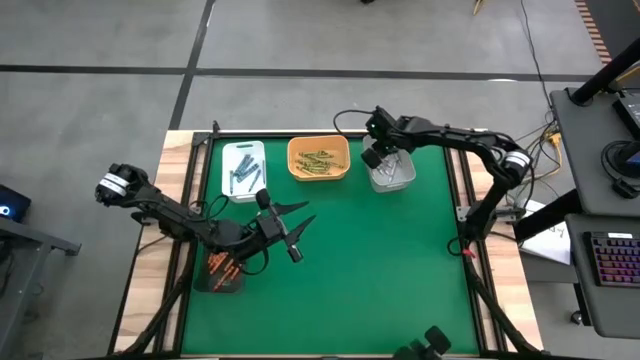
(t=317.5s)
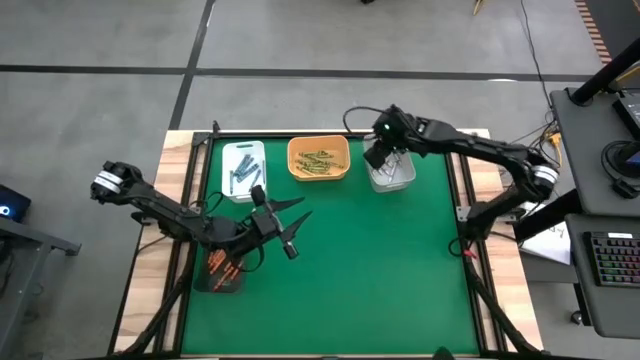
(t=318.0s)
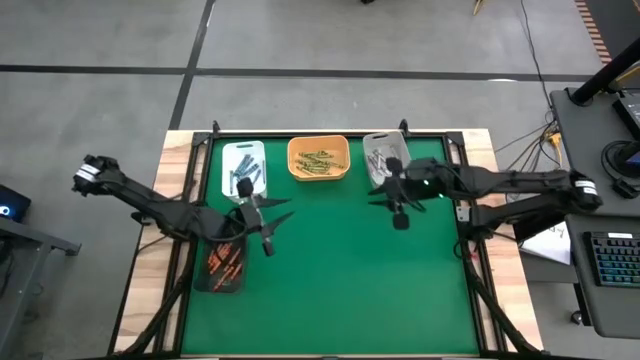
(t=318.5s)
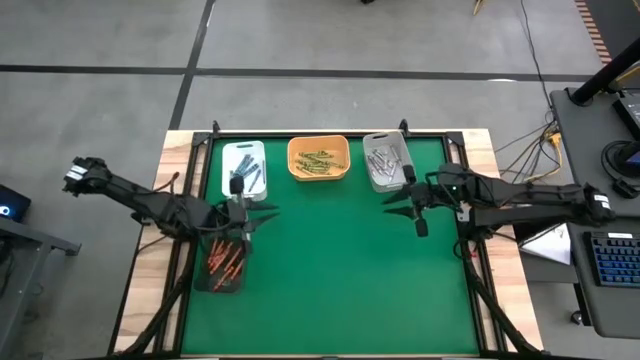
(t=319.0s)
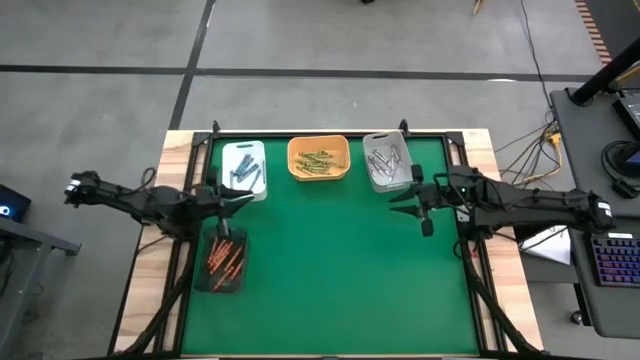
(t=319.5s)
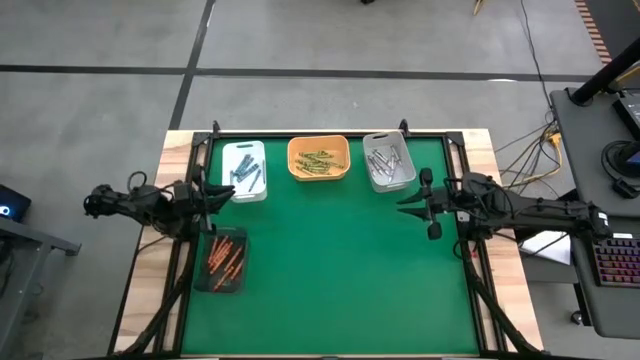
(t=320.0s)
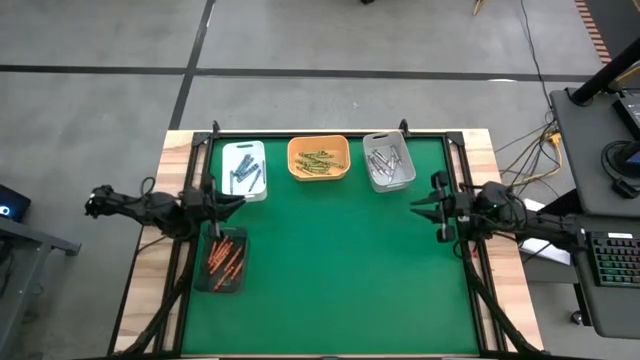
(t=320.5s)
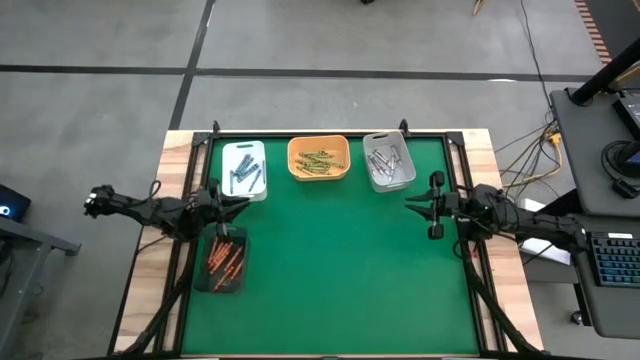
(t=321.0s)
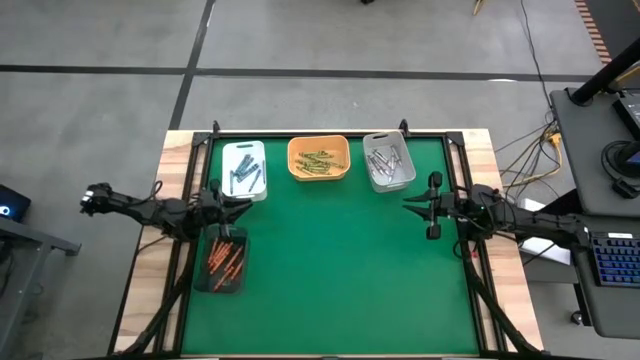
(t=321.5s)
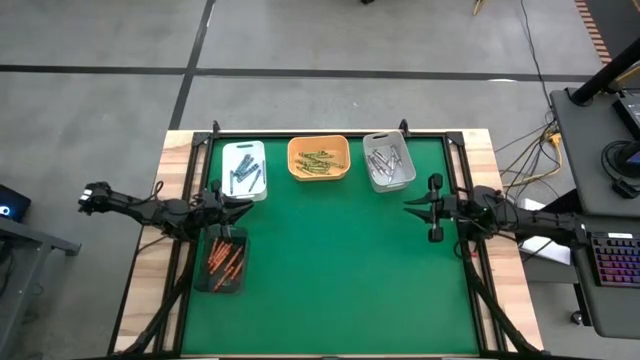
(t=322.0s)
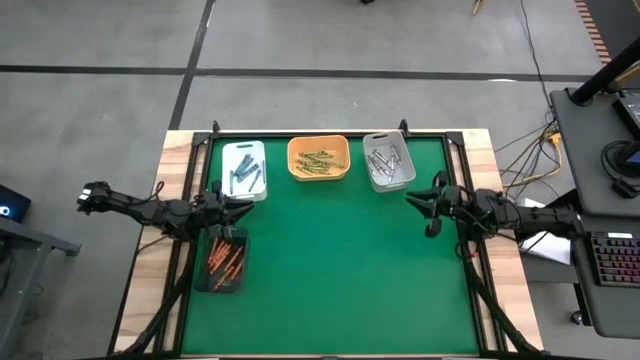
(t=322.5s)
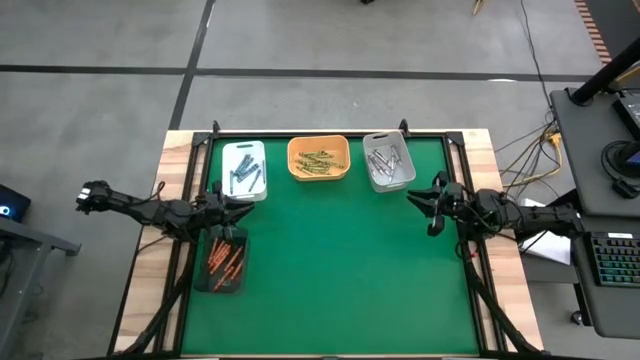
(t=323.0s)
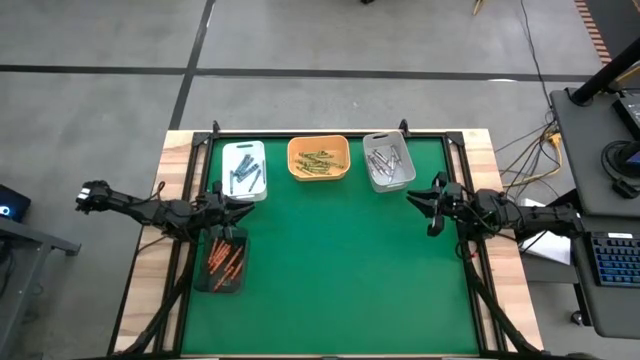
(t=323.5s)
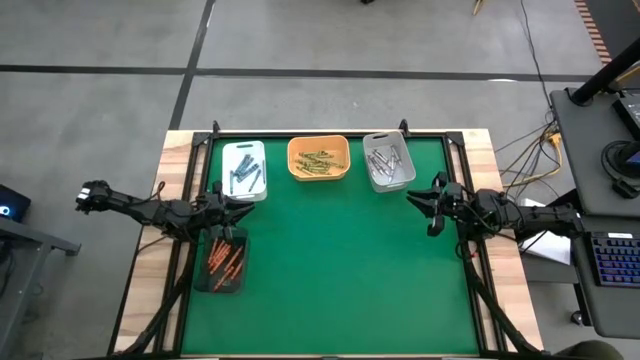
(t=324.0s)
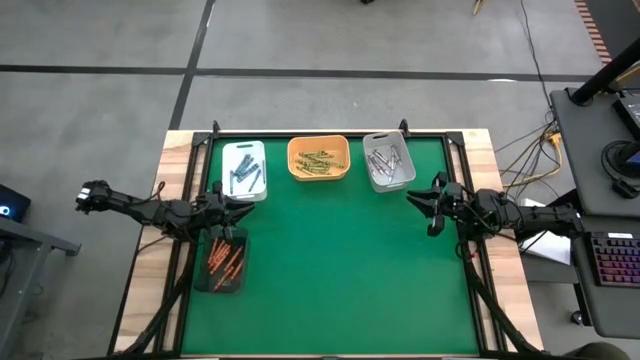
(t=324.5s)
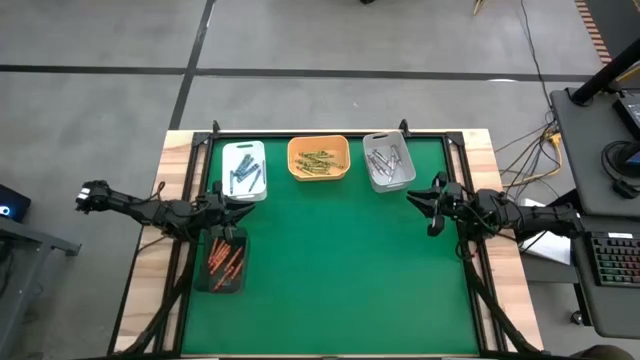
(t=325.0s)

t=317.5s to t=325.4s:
Task: Sort crayons
Return to Home Position

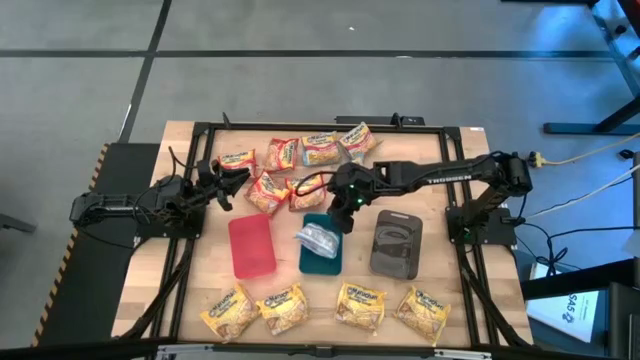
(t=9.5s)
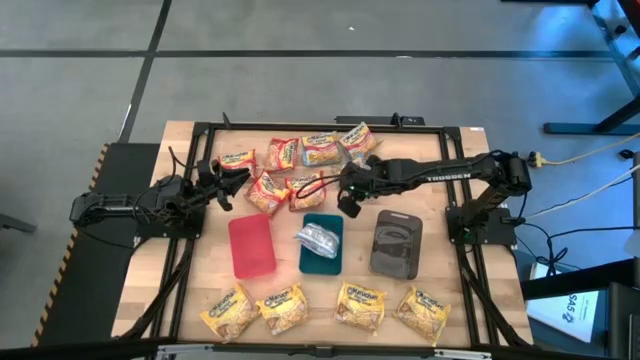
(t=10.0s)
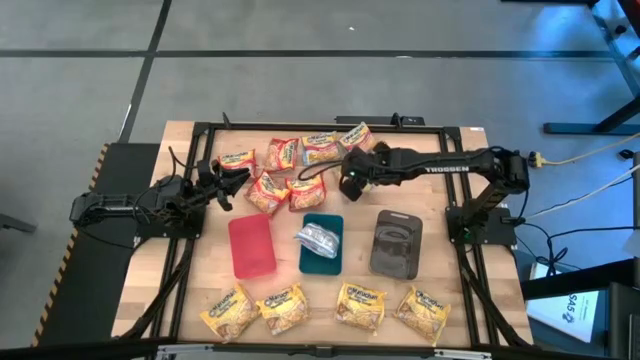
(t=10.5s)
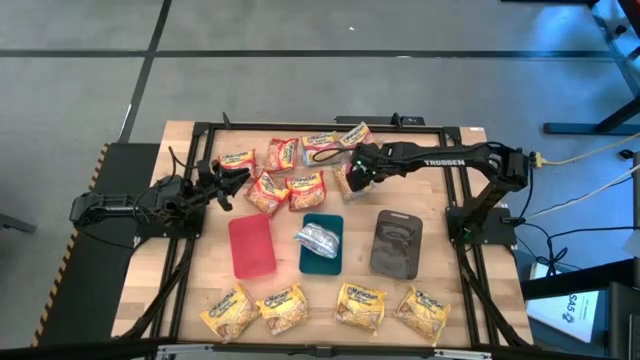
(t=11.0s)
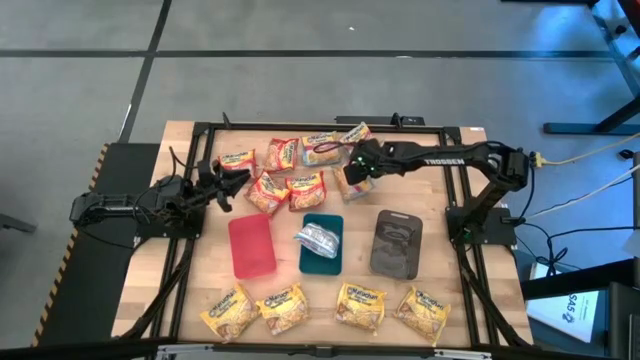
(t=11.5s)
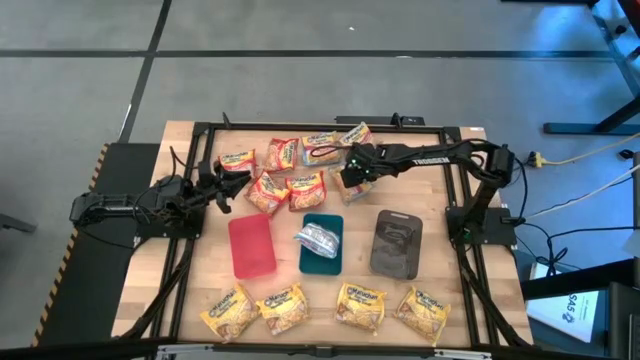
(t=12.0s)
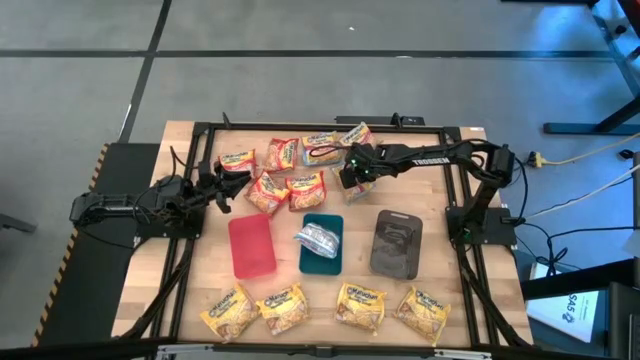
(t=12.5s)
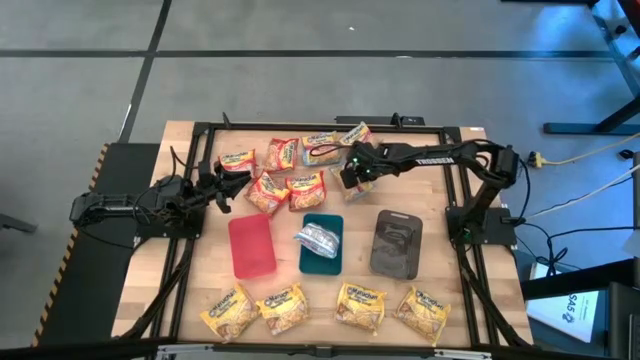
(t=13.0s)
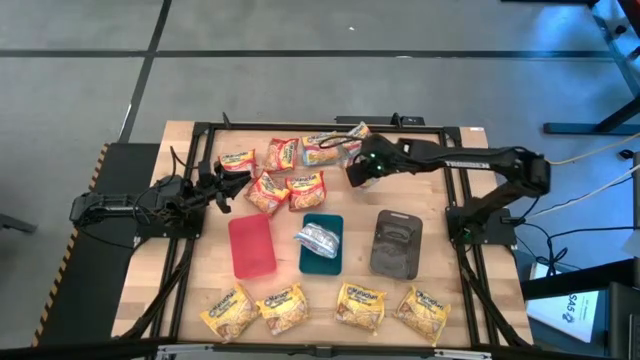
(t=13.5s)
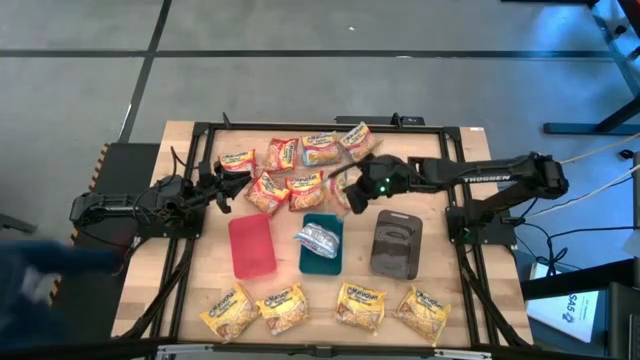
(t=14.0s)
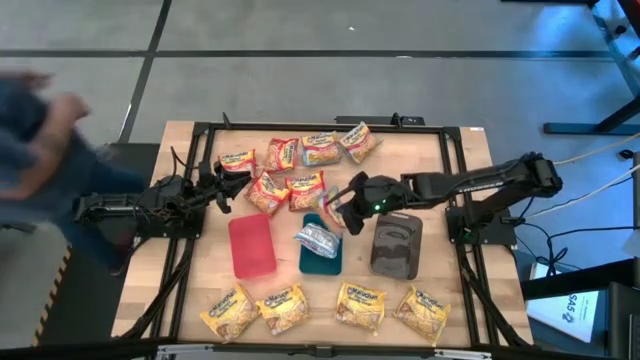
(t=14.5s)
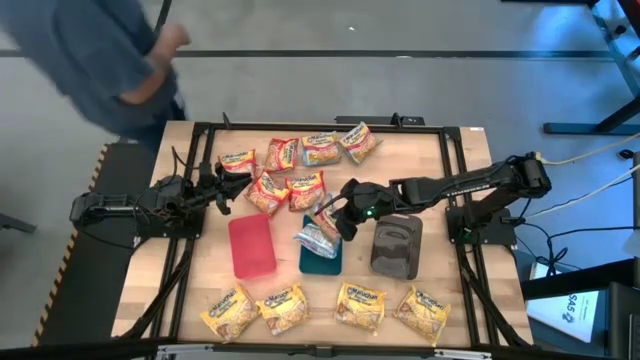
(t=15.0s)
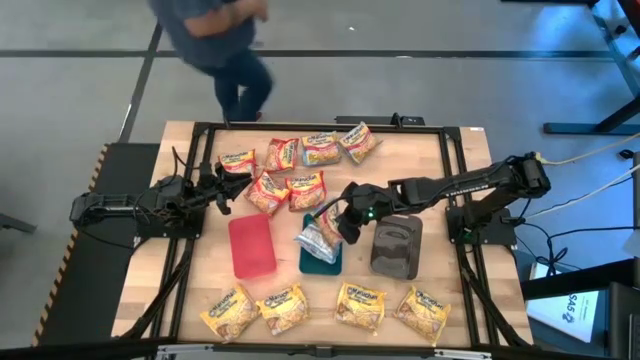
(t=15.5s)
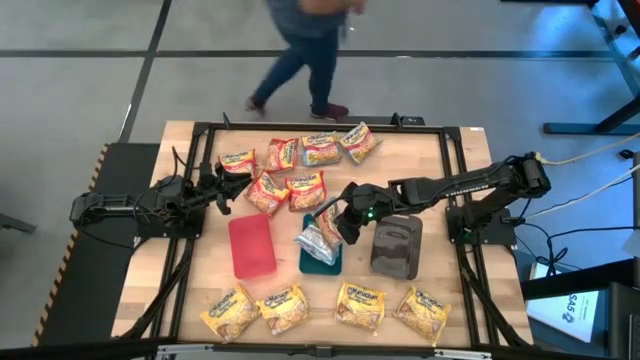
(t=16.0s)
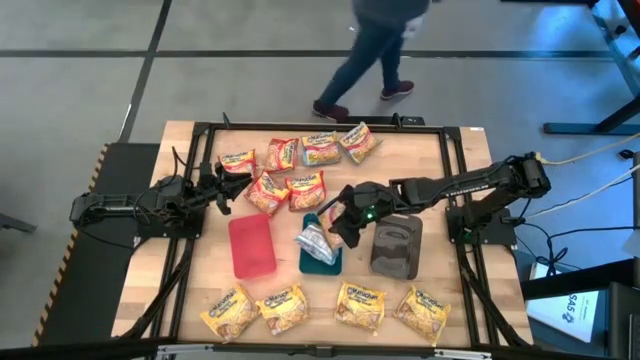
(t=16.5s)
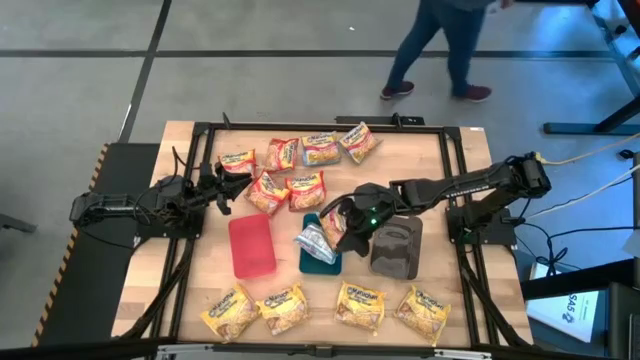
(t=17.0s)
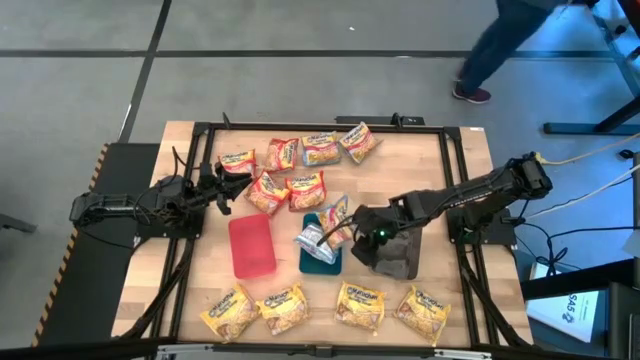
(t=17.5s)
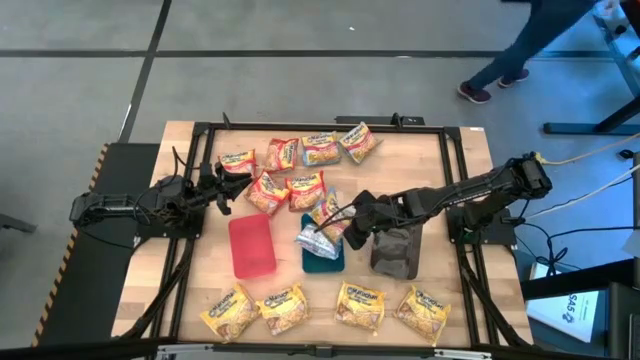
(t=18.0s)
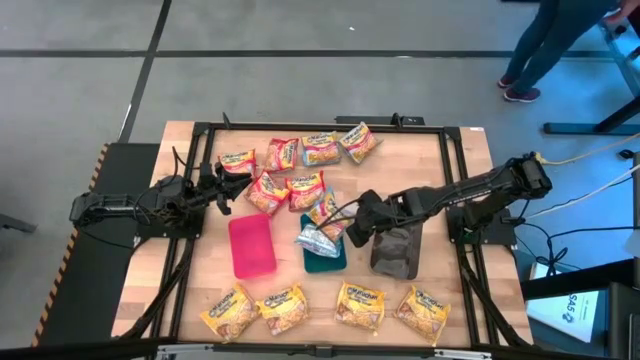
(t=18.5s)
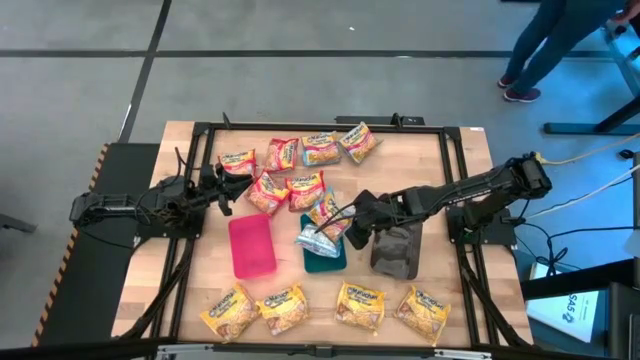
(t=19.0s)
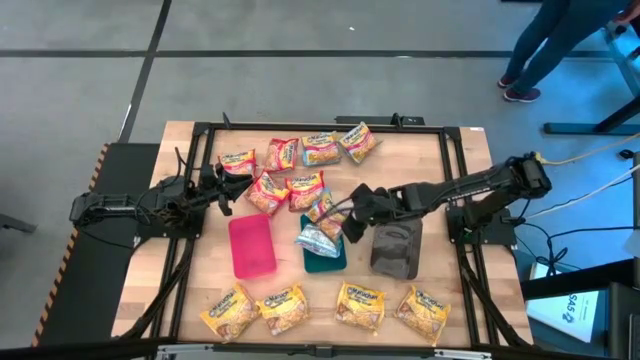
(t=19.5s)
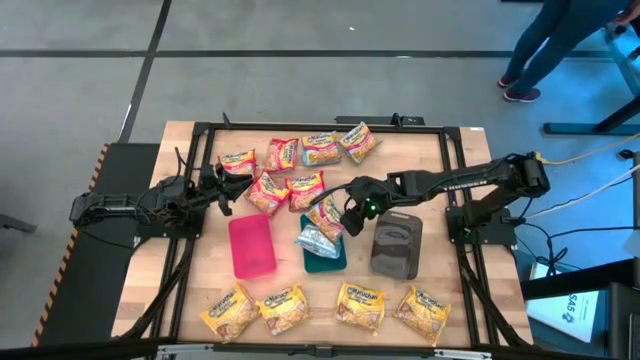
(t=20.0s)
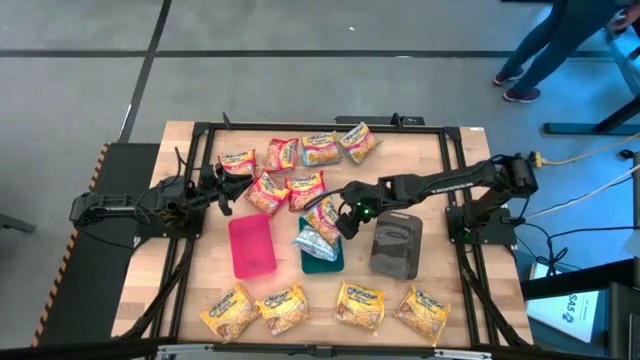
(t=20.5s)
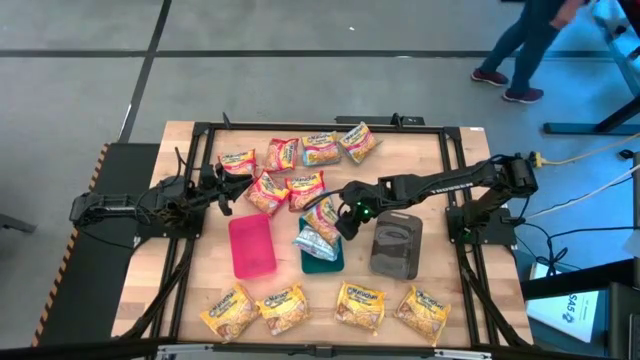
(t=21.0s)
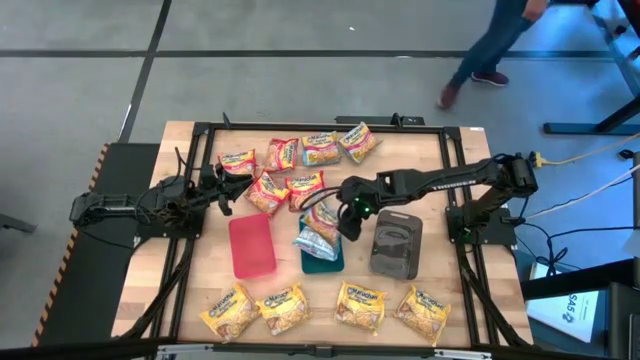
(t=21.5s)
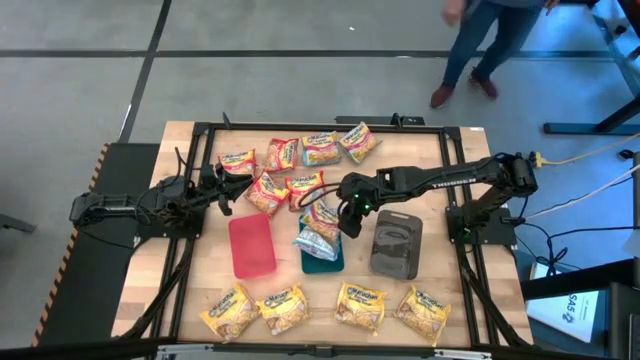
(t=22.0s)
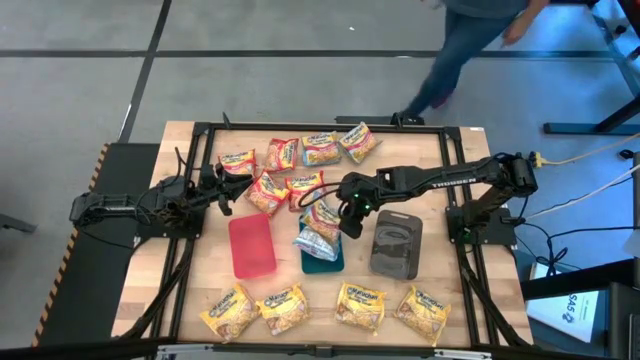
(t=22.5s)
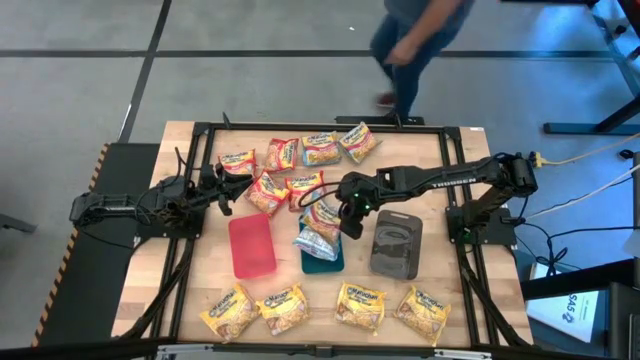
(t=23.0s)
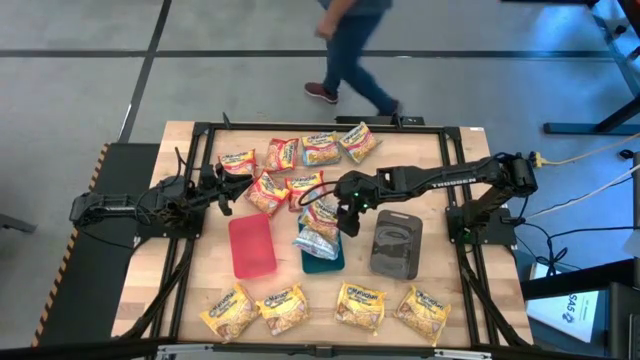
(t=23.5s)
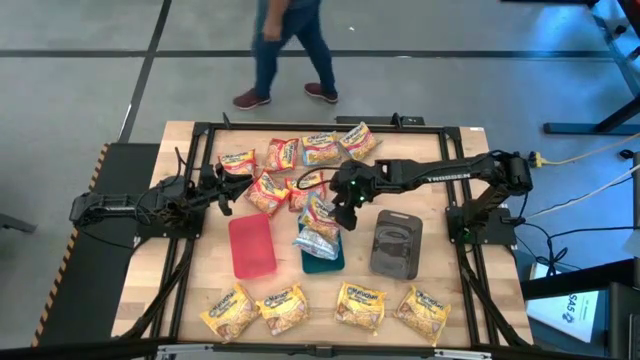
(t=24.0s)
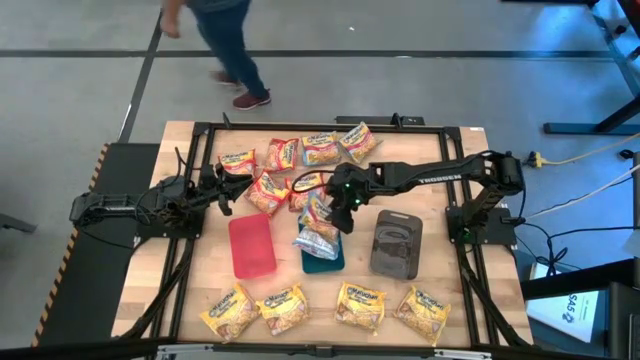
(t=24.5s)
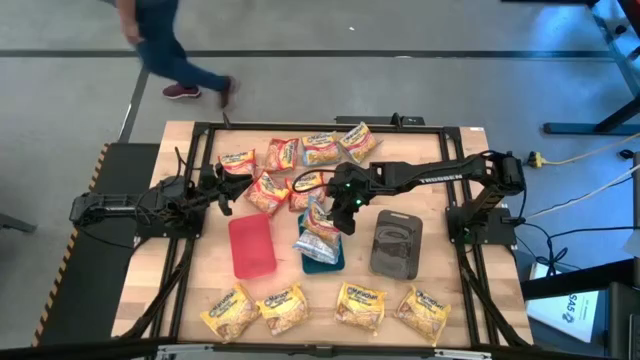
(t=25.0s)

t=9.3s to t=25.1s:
Task: Sort Maruchan noodles
Put the blue noodle pack into the blue bin
